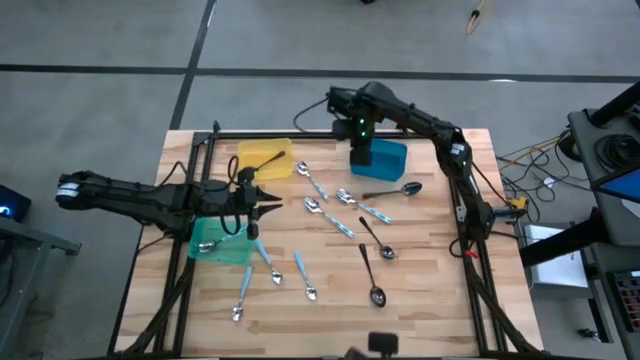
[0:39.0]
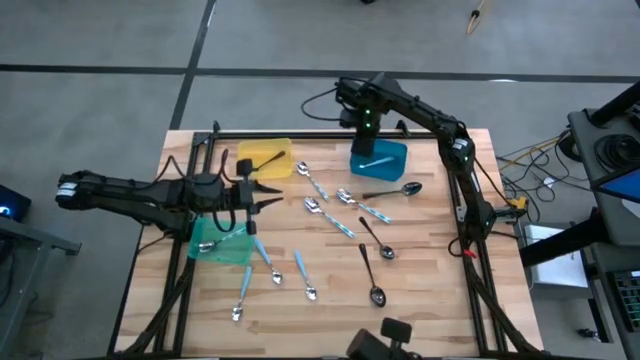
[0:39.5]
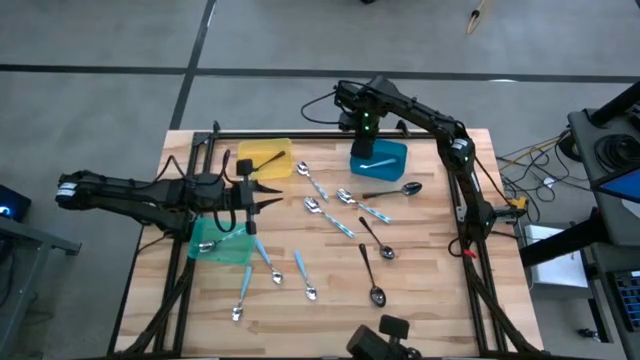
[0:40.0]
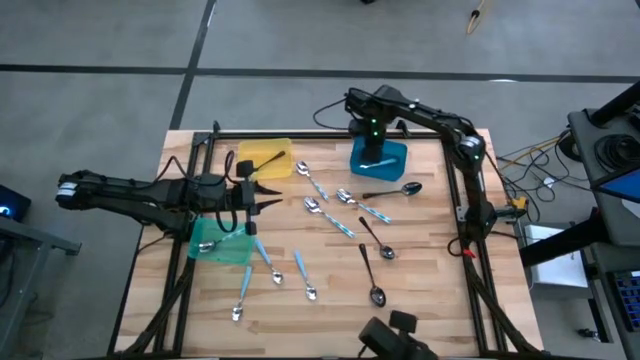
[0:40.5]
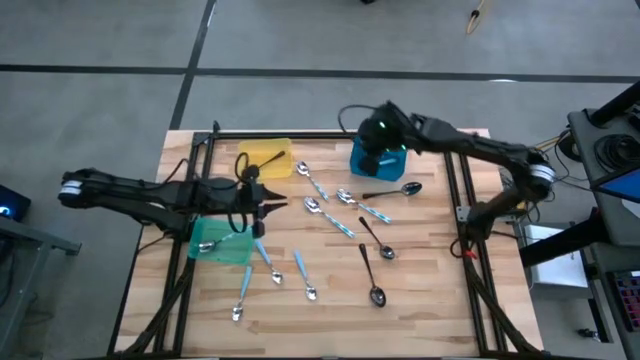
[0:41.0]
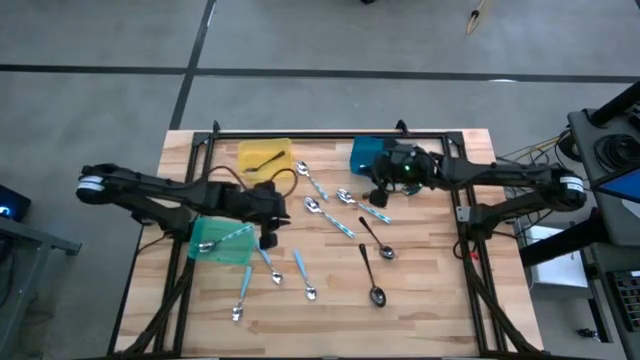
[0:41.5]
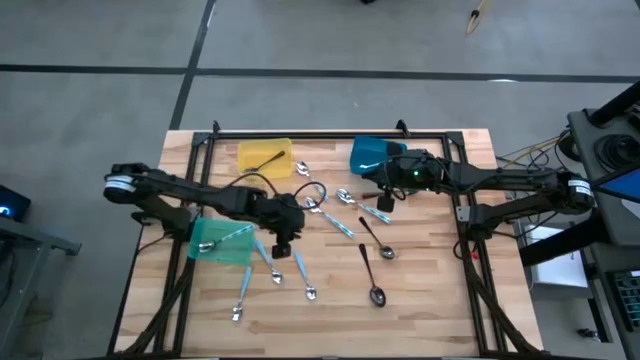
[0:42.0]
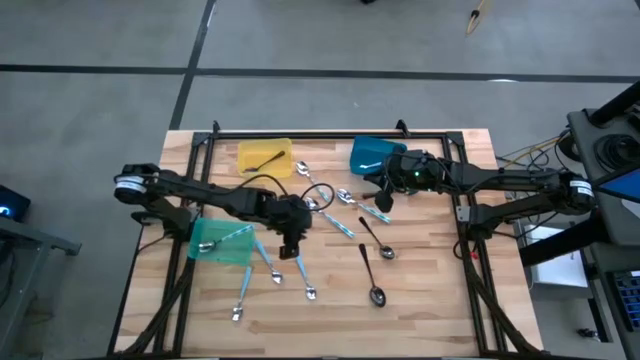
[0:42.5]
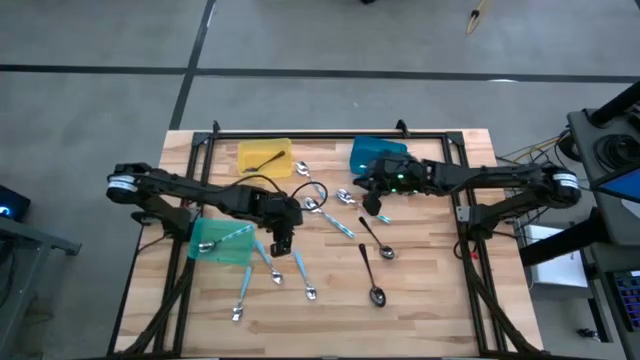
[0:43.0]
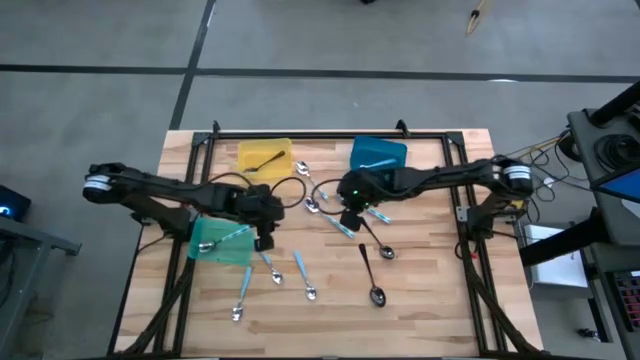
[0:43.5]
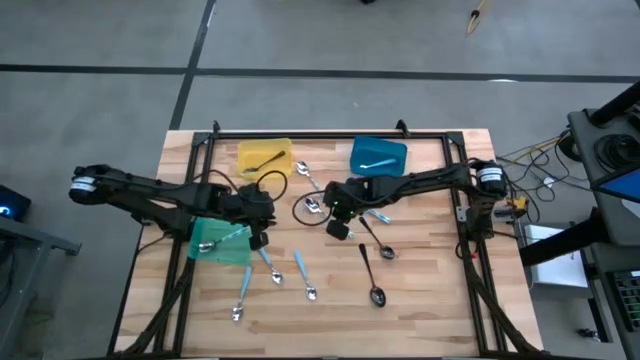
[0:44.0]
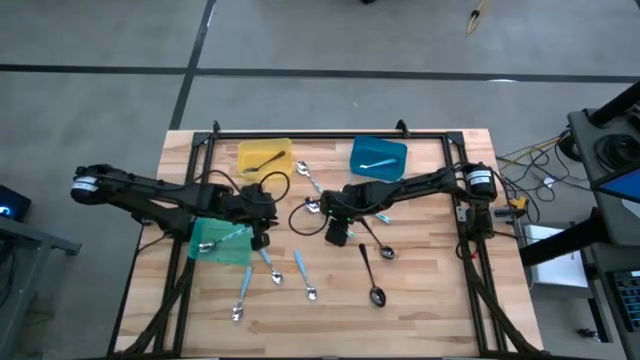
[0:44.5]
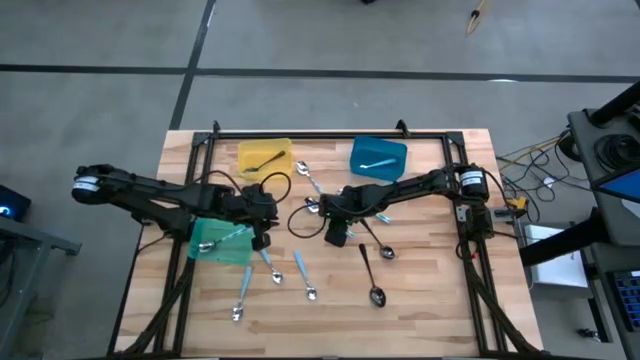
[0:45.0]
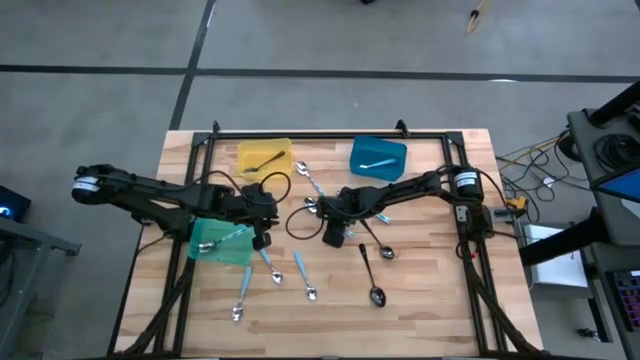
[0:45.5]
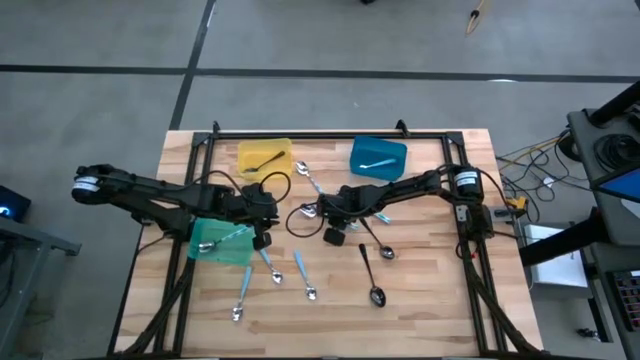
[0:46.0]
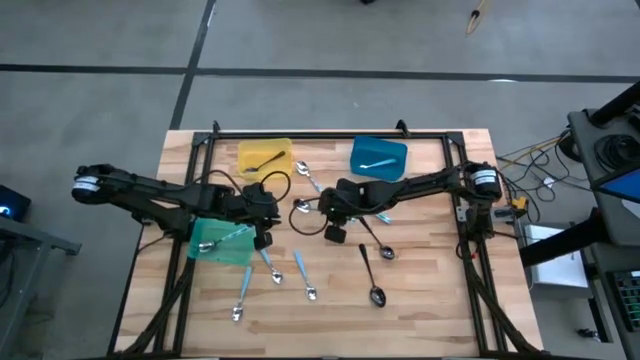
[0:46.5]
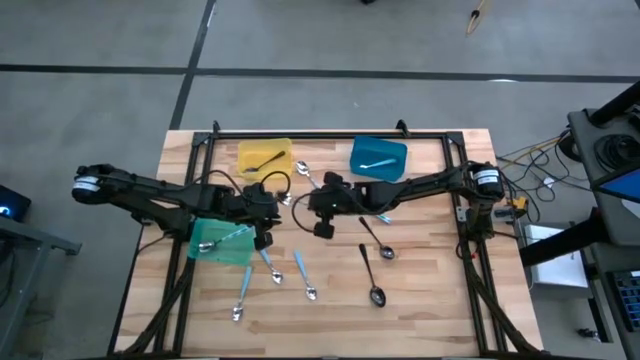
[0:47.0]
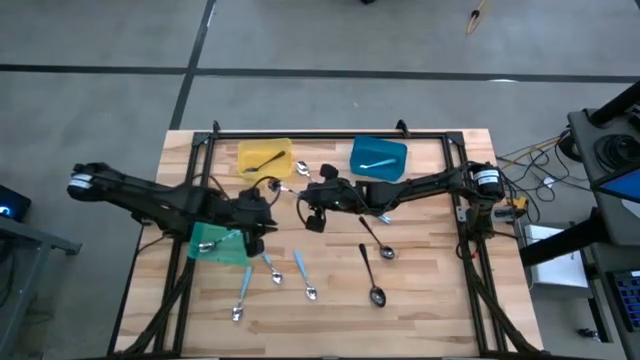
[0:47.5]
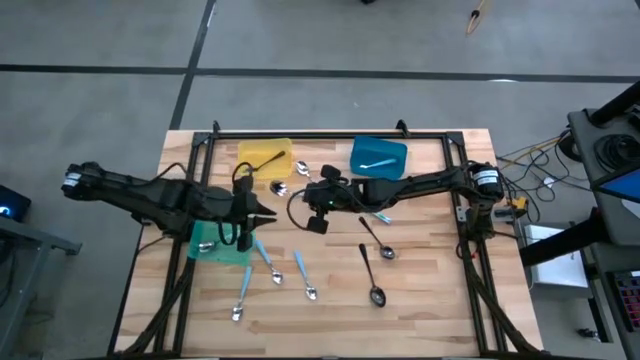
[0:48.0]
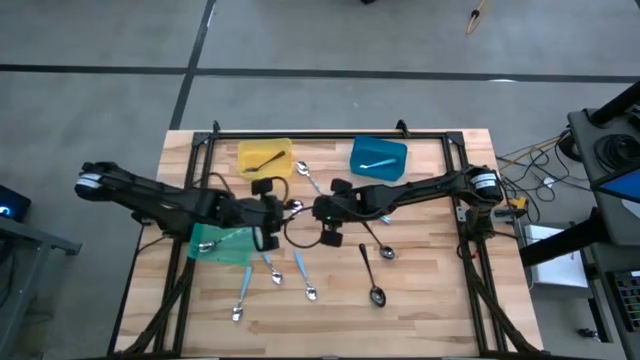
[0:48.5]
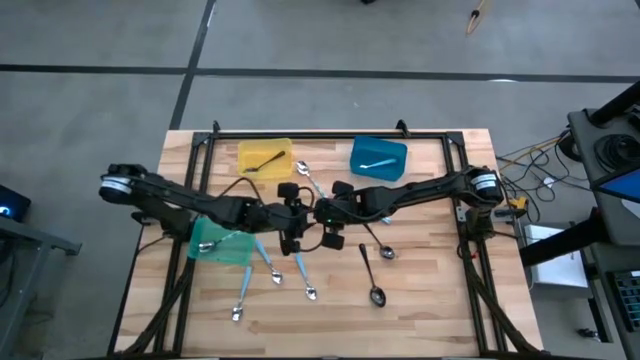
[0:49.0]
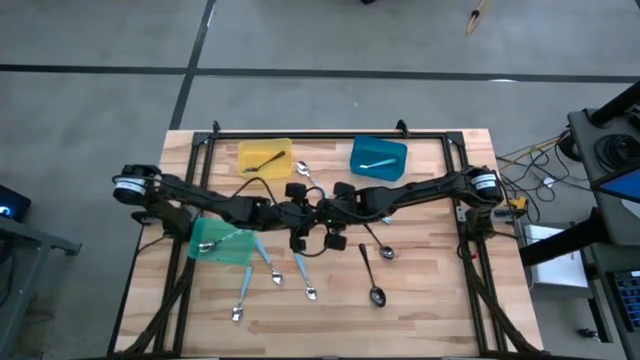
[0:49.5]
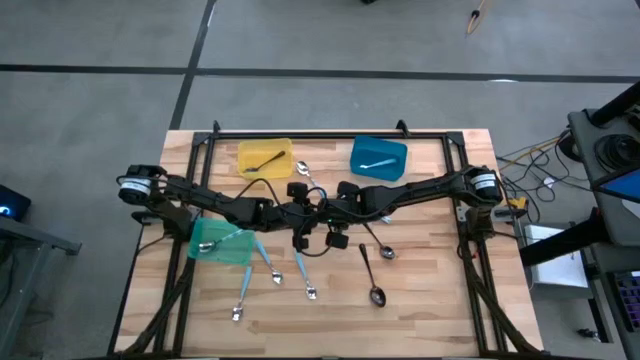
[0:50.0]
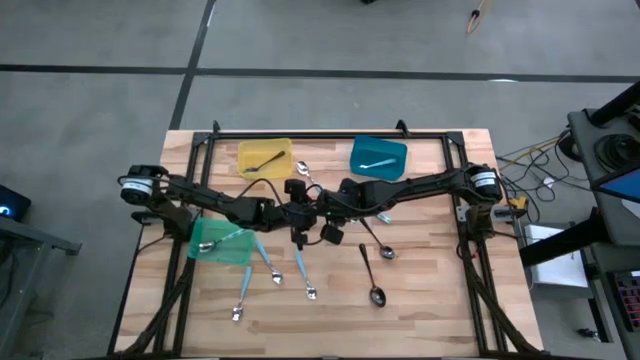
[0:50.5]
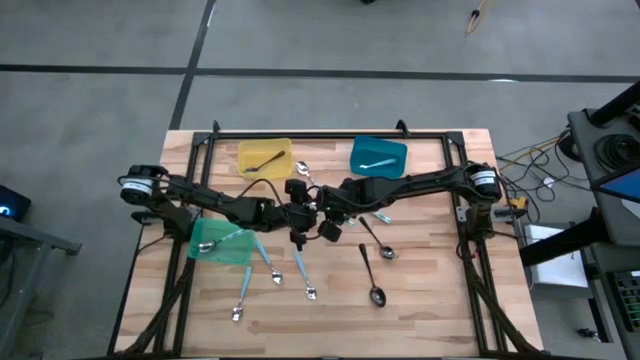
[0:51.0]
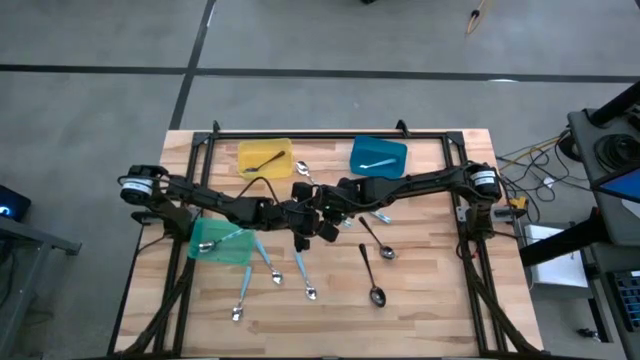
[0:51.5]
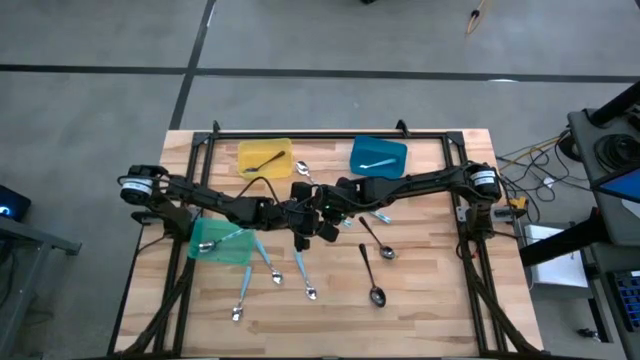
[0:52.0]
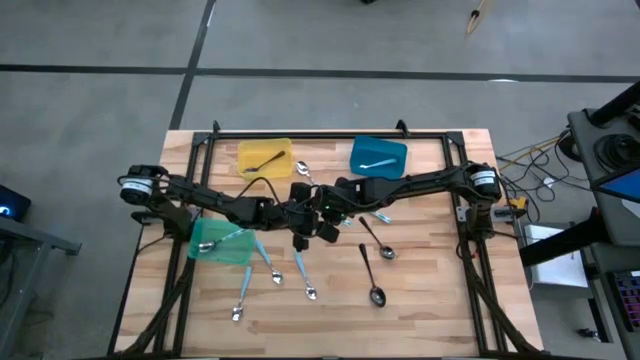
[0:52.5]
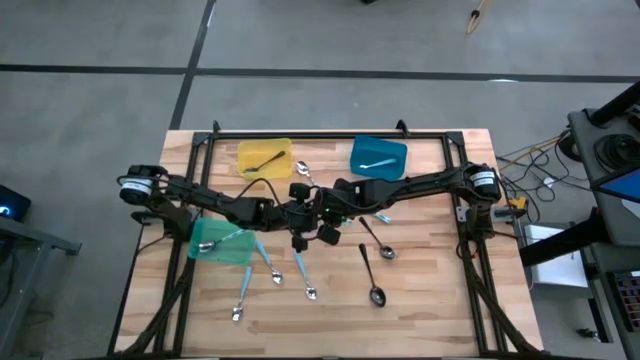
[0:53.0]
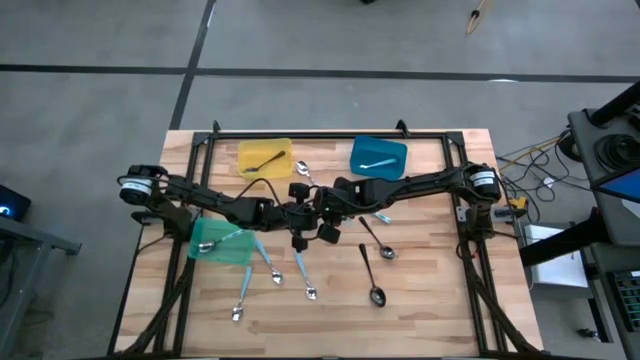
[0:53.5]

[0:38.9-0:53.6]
Task: Sort silverware by color (type)
Put the blue patterned spoon into the green bin

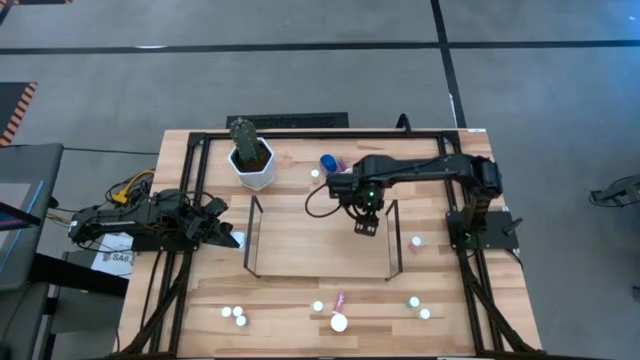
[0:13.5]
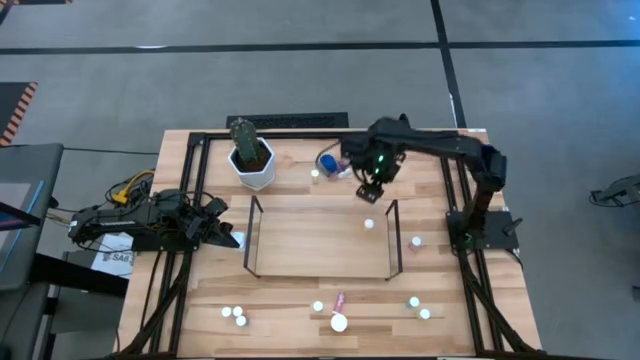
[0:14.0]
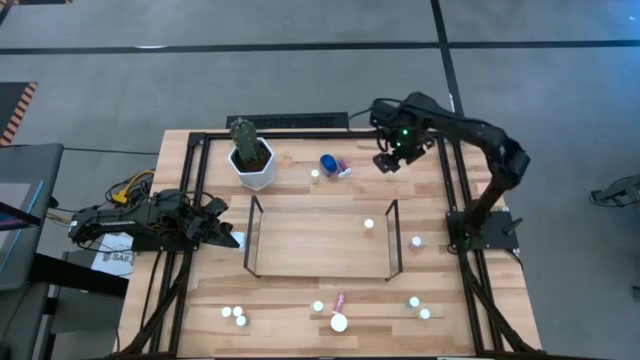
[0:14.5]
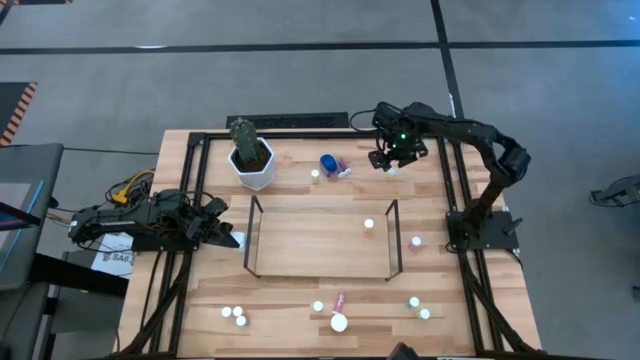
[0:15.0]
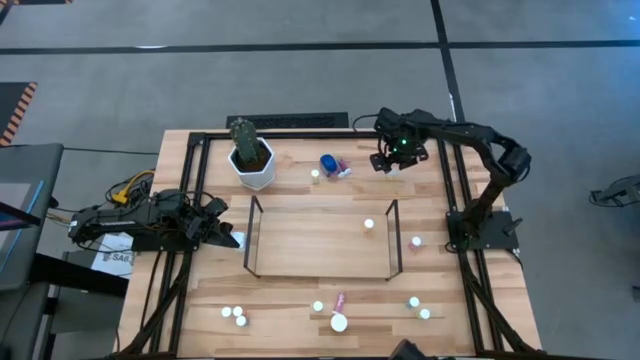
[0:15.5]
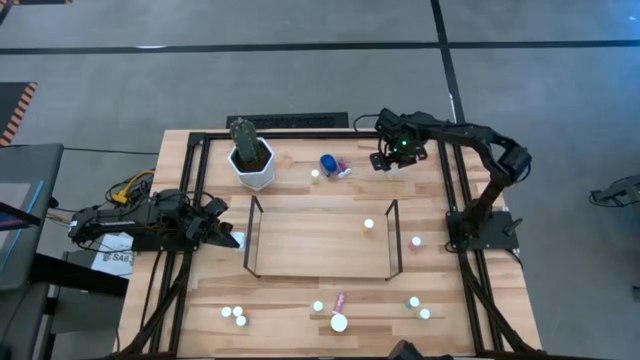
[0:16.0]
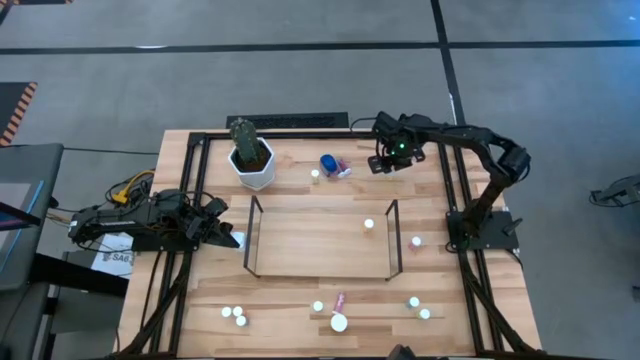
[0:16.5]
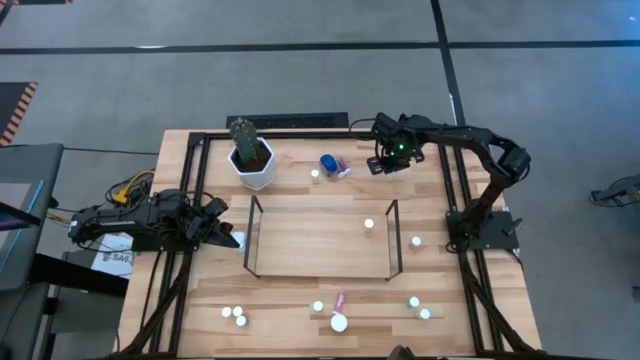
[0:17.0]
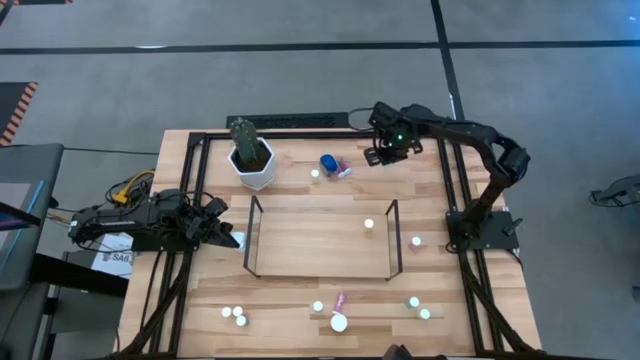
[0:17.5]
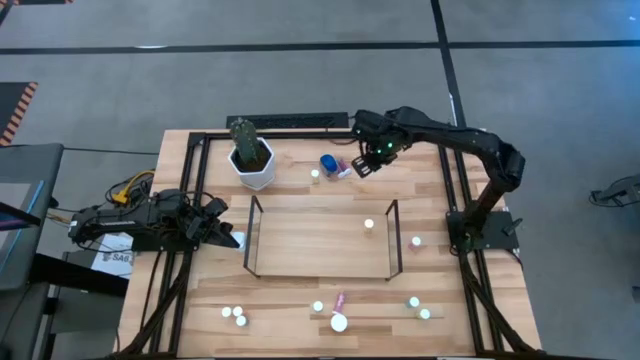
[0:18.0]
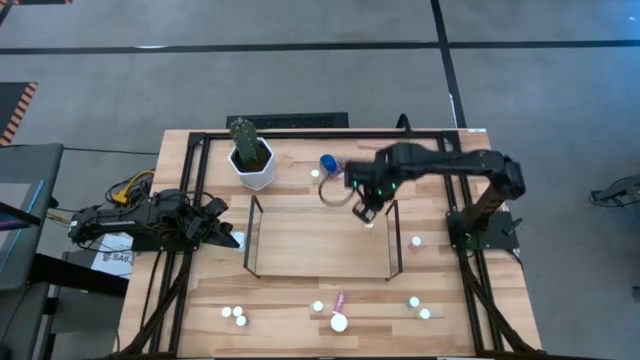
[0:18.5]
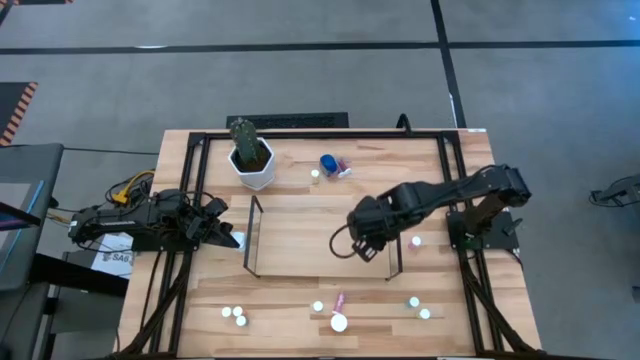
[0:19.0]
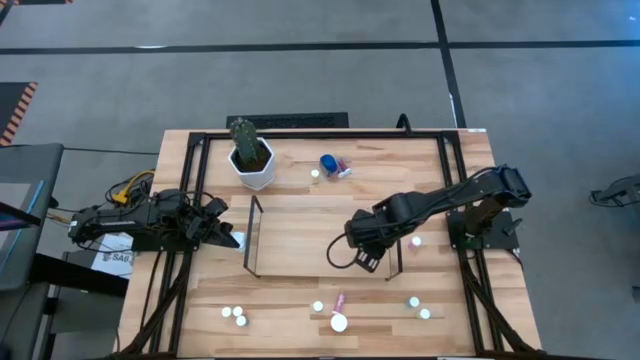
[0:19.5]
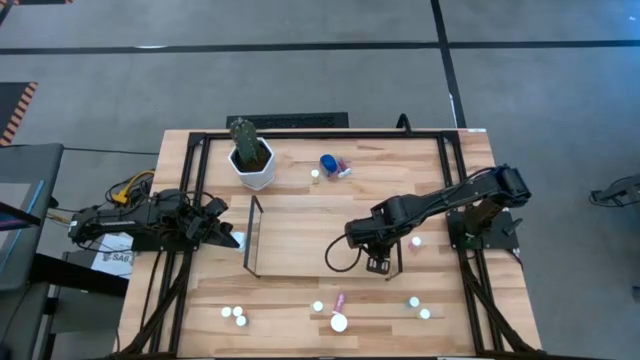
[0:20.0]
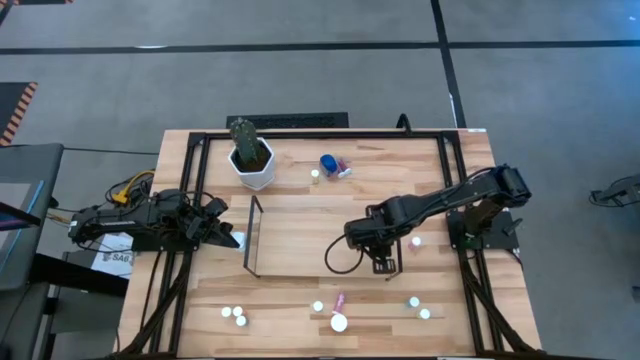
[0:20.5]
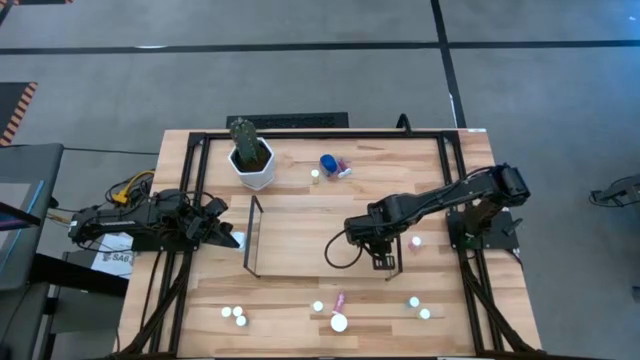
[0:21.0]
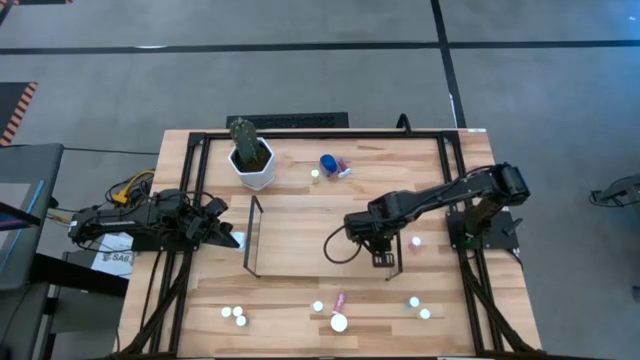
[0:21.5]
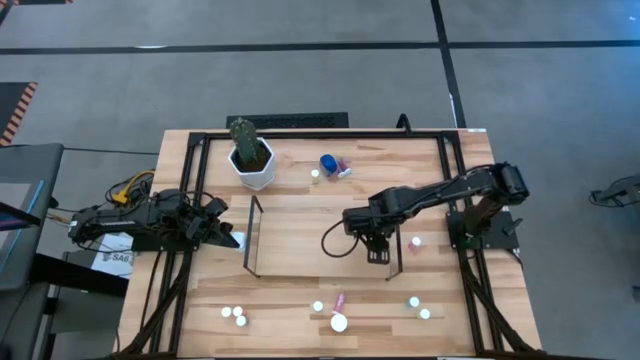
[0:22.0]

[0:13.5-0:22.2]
Task: Pick and place medicine bottles onto shelf by color
Put the orange pill bottle on the shelf
